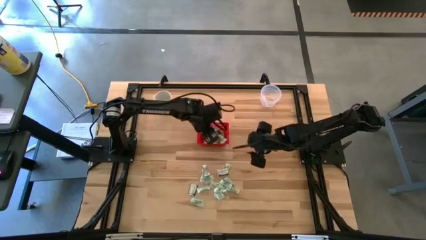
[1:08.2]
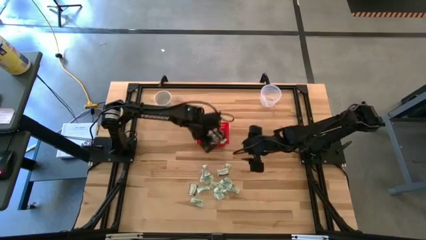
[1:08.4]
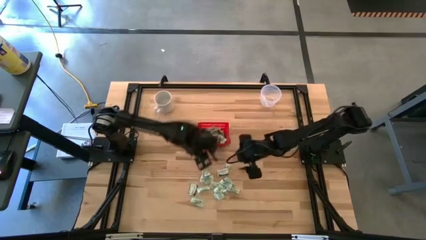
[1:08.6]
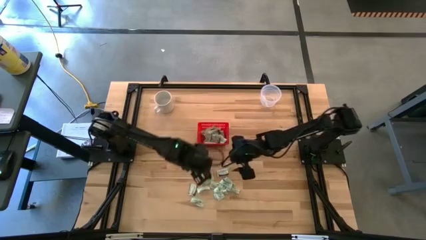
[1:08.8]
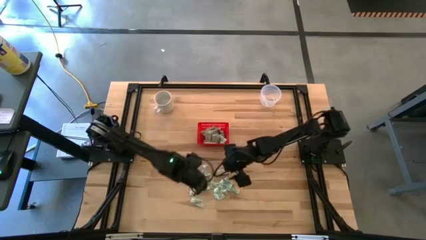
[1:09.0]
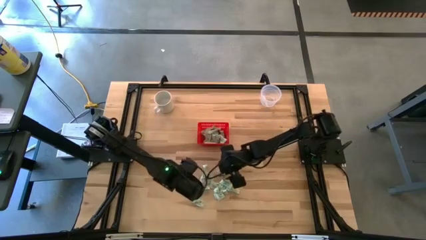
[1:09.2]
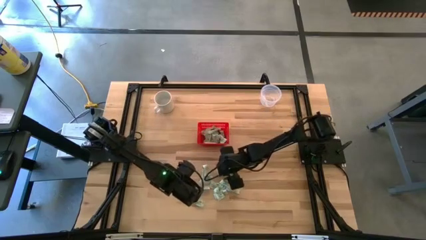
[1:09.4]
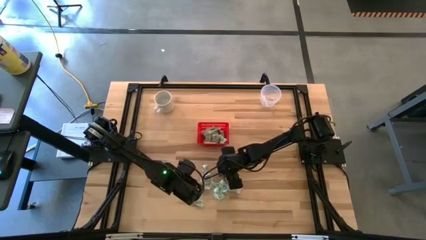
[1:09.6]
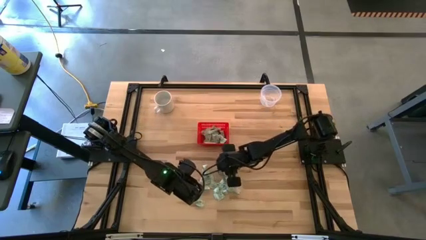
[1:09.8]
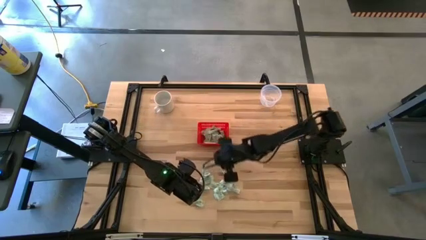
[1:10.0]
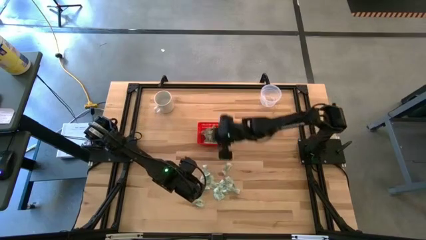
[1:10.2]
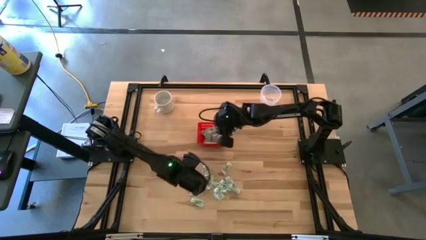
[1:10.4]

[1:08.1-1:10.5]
Task: Pick and place items into bin
Put the truvia packet into the red bin

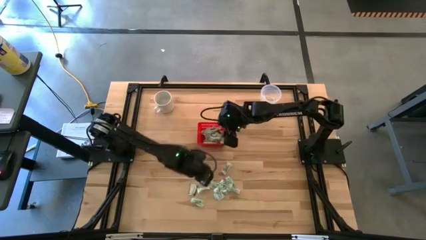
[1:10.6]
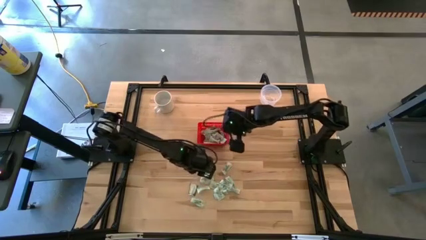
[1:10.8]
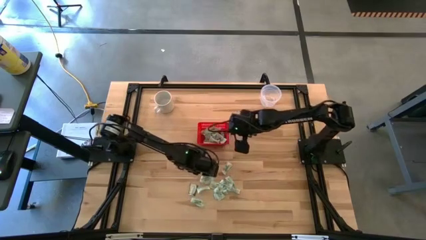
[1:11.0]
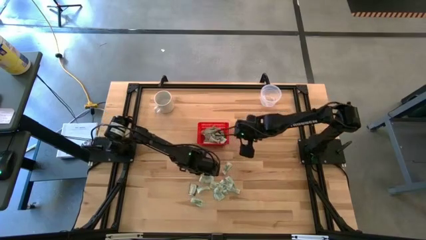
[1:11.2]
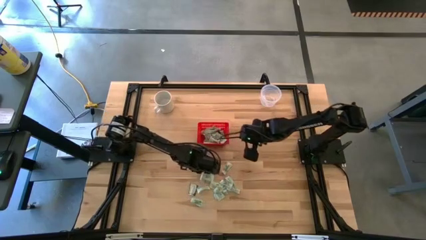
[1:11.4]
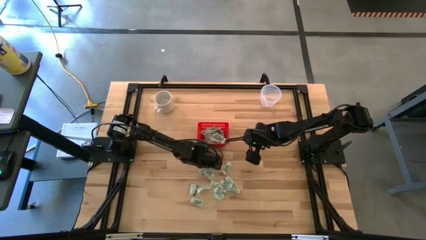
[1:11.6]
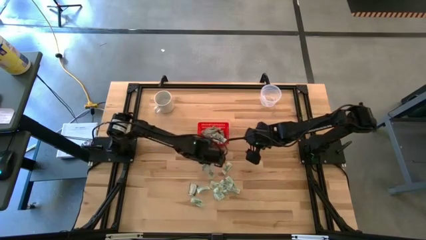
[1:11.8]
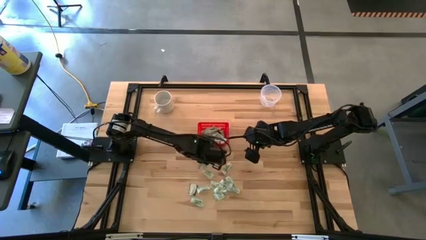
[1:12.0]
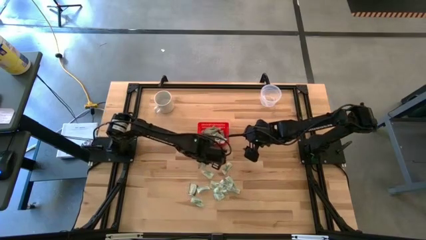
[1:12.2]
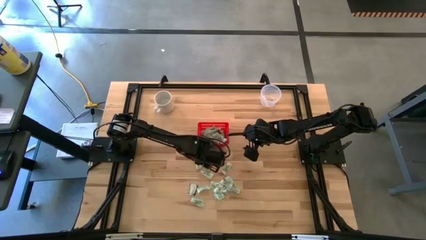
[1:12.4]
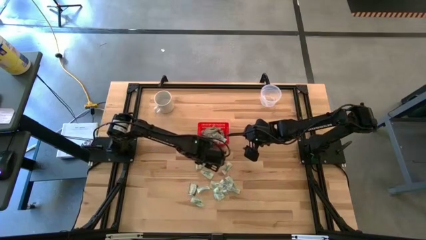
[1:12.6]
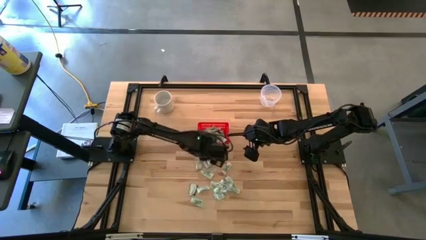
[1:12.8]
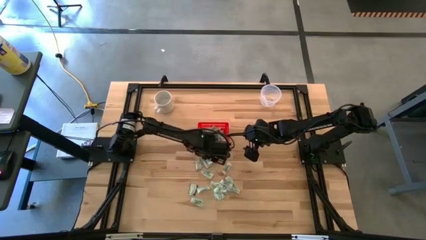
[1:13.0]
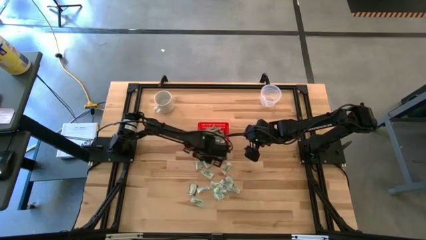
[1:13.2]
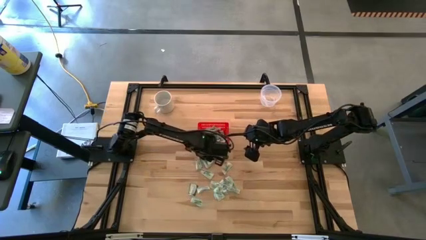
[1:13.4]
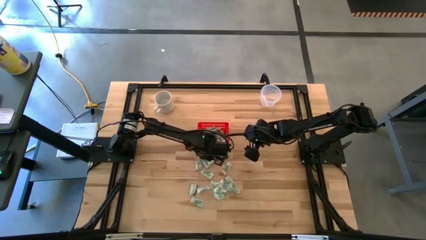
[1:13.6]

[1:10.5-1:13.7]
Put the stevia packet into the red bin

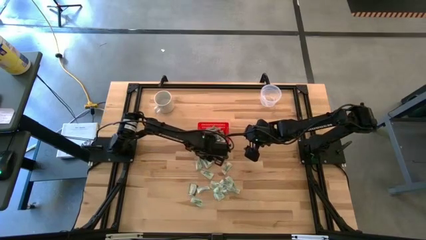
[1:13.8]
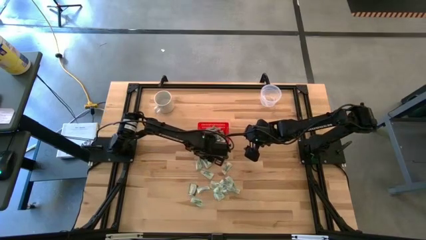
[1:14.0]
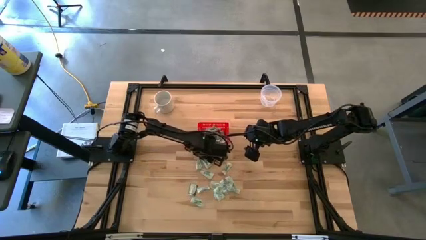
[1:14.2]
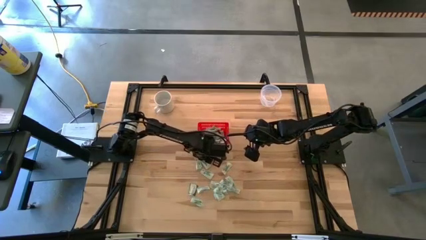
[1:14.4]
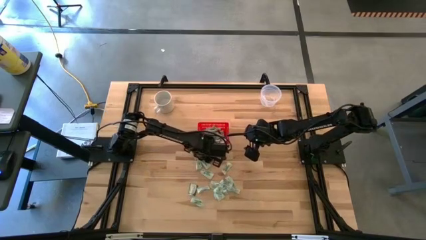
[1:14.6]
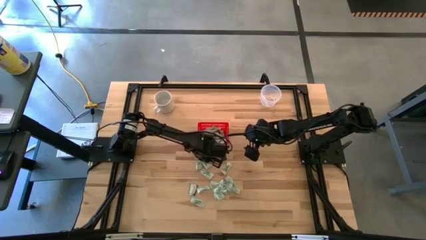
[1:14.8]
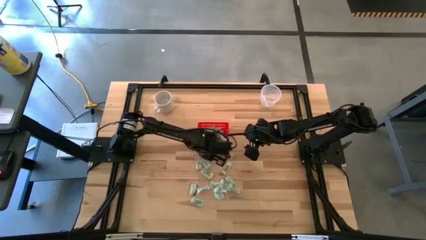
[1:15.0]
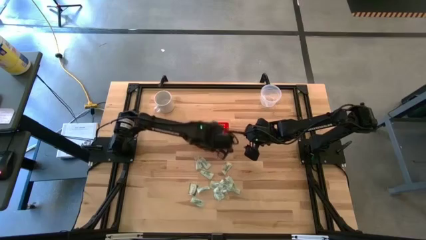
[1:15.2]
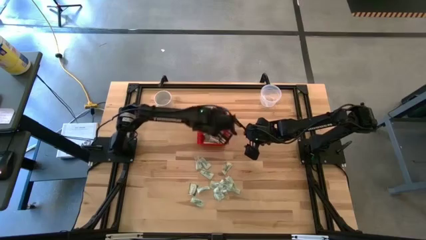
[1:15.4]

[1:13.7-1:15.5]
Put the stevia packet into the red bin

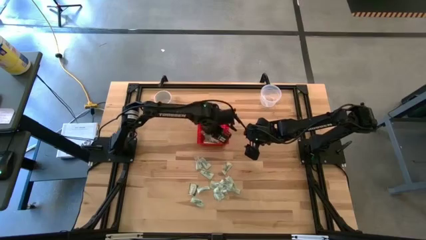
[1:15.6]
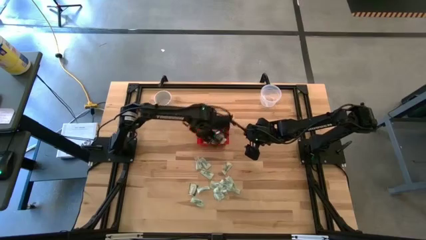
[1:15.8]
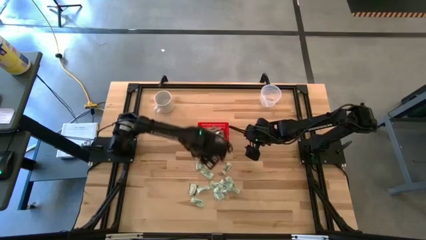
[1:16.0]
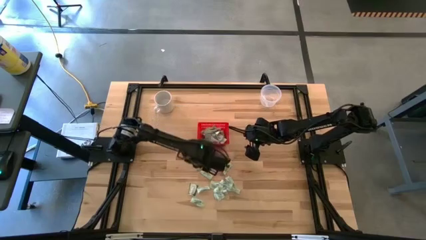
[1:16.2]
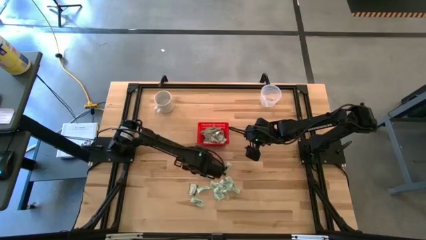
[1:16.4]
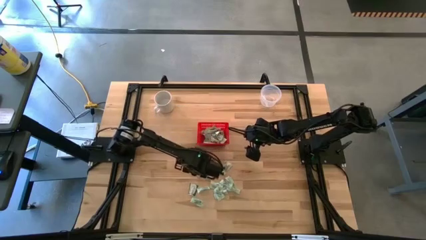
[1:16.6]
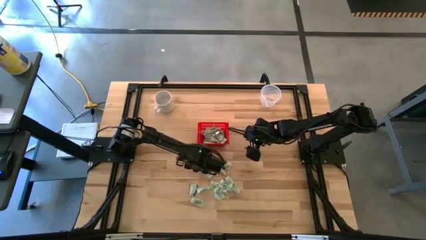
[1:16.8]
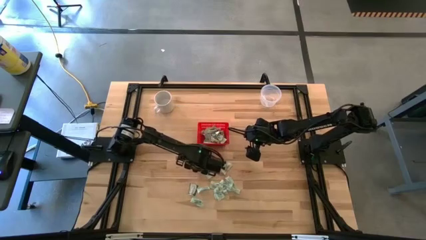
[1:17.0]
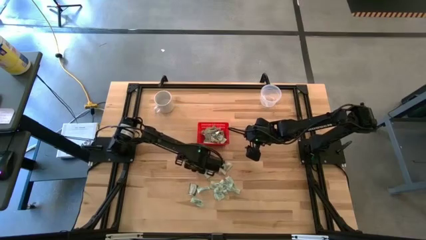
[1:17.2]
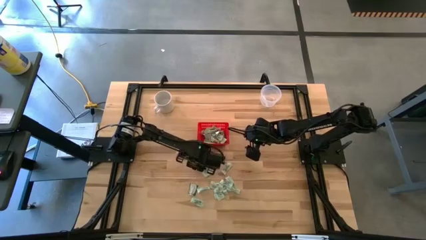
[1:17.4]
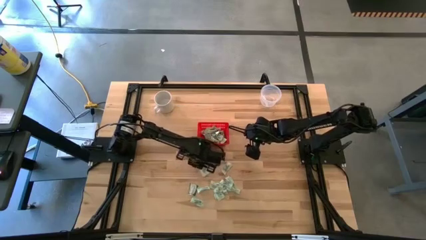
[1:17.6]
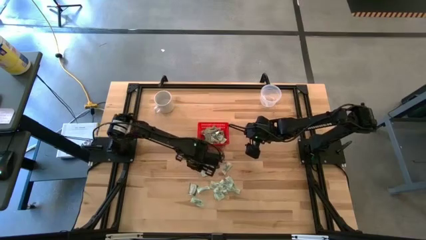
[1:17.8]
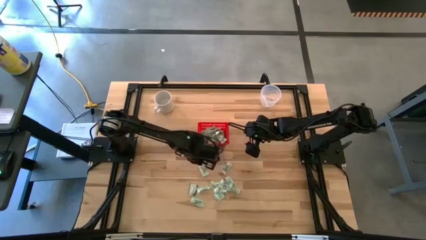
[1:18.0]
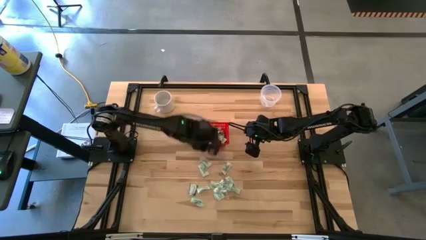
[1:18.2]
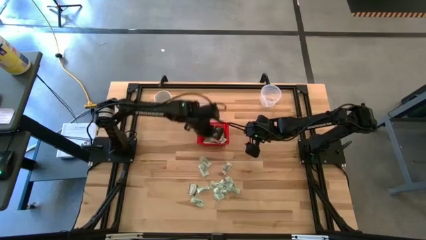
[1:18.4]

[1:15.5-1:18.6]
Put the stevia packet into the red bin

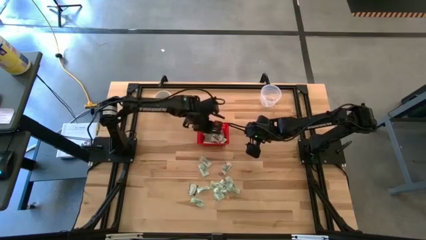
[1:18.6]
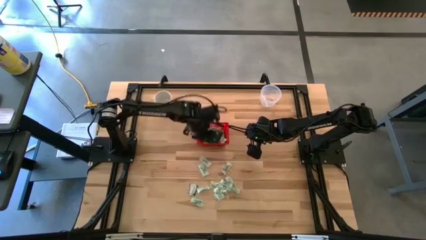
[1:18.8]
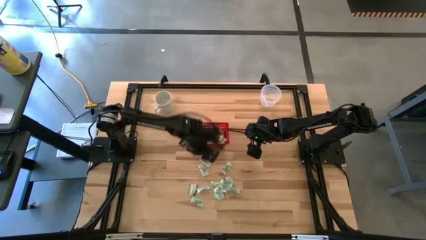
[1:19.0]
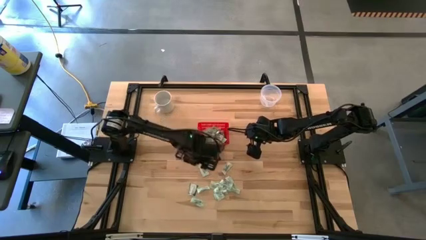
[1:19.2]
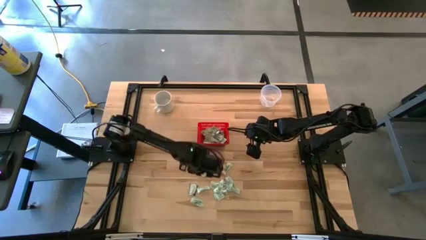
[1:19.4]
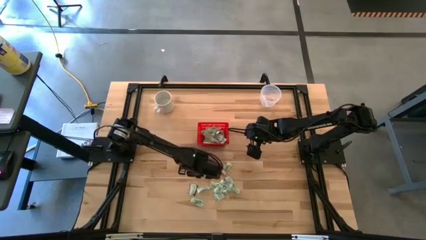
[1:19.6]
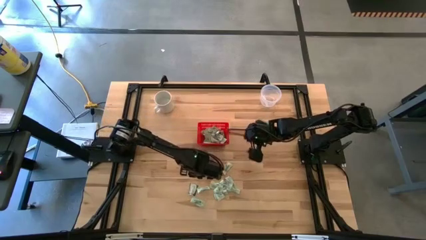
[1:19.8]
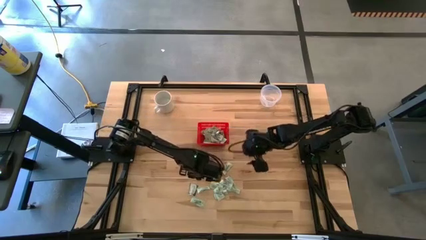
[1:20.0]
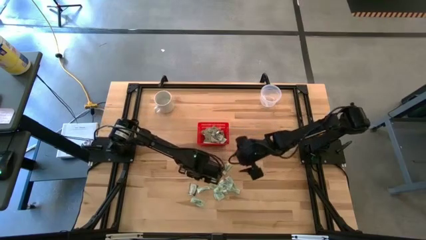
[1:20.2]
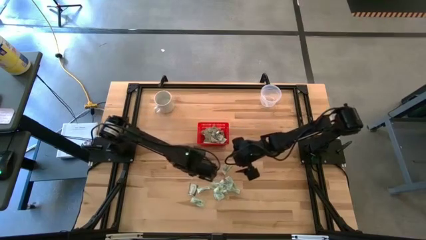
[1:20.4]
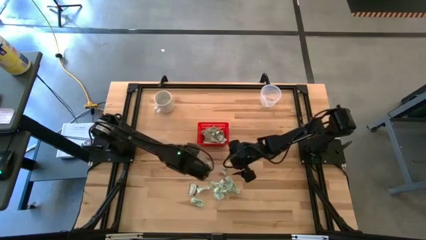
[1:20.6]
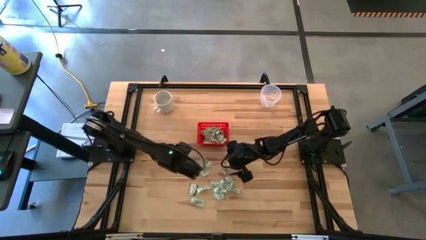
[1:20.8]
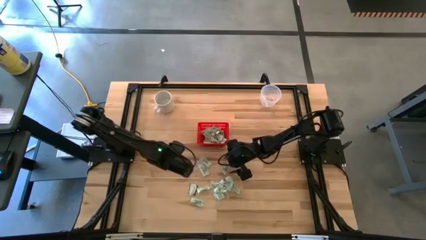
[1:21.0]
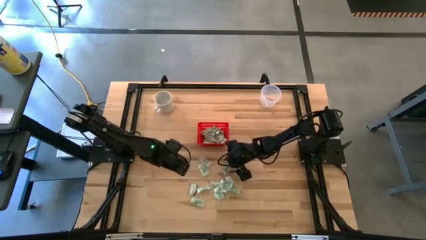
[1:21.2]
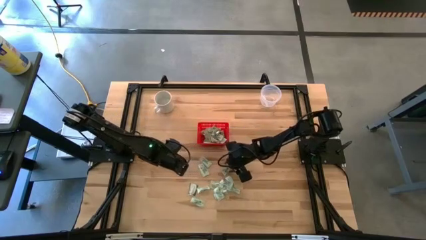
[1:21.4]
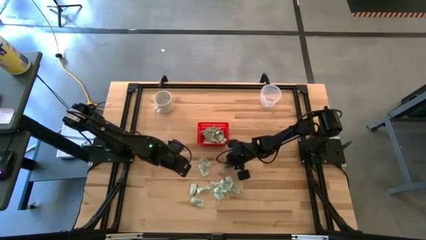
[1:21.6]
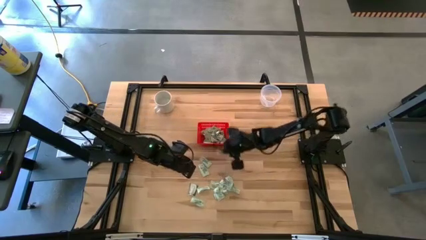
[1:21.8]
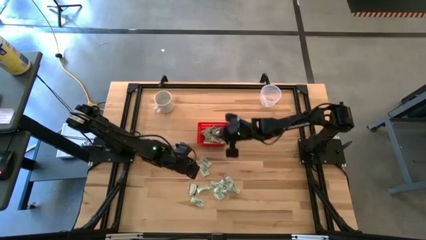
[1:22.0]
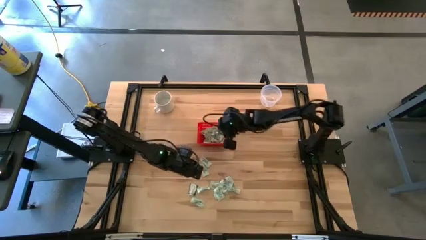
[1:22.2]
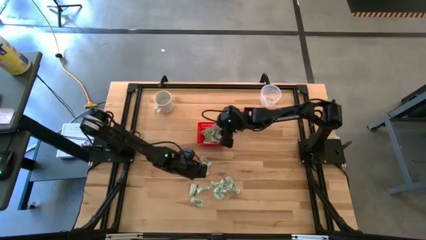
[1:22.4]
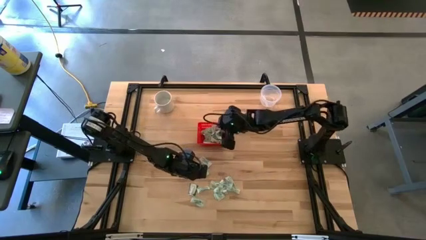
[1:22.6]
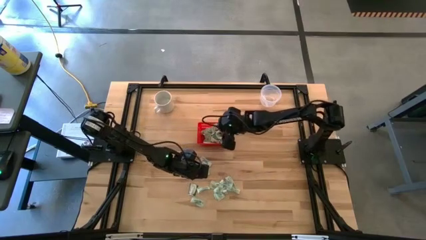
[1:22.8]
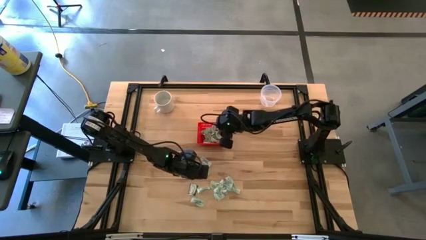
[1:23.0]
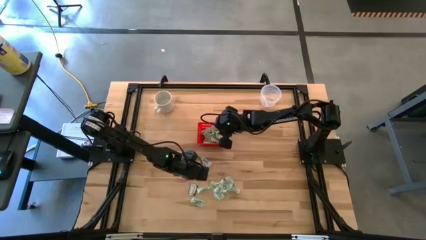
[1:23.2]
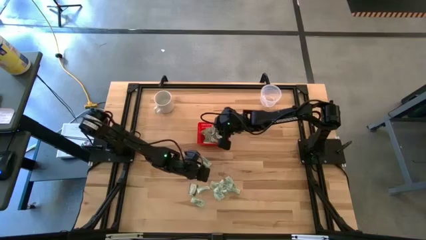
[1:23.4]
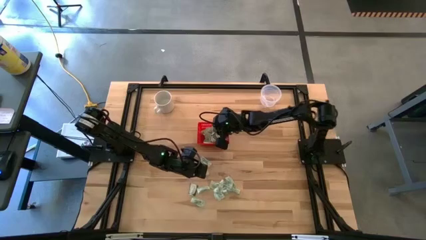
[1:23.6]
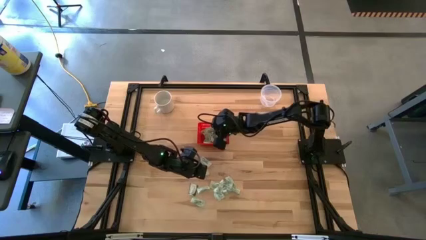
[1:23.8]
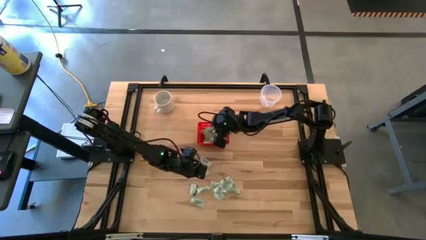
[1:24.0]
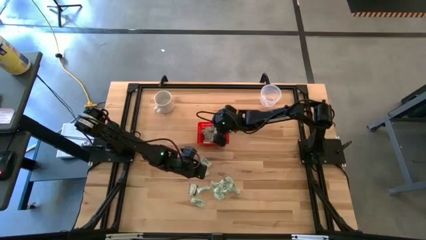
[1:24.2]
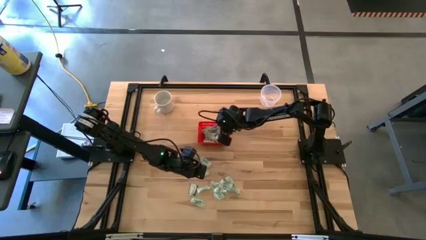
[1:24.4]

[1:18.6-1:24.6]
Put the stevia packet into the red bin

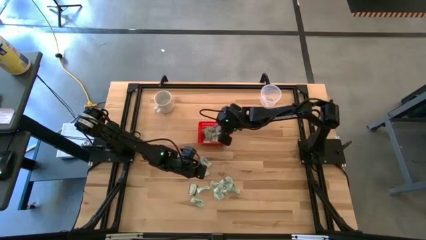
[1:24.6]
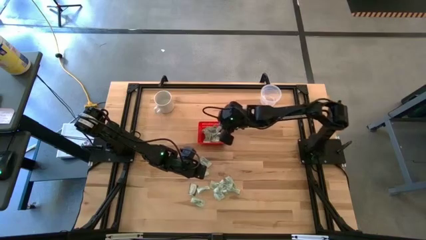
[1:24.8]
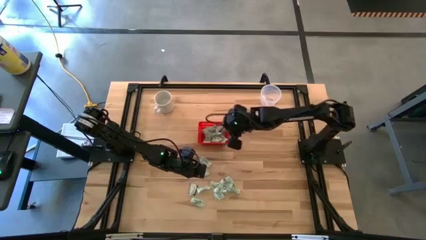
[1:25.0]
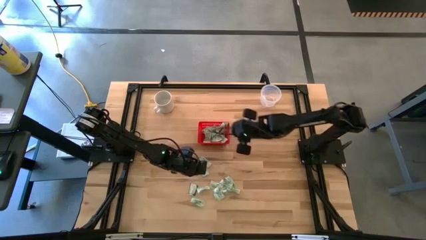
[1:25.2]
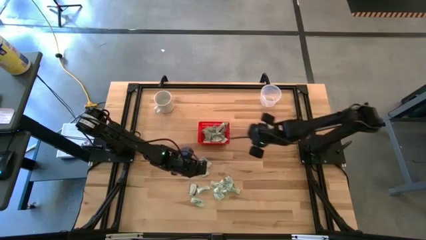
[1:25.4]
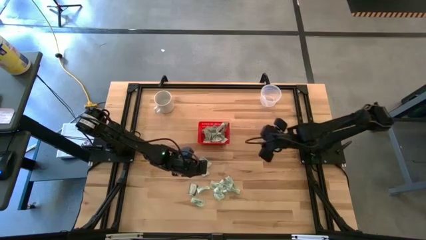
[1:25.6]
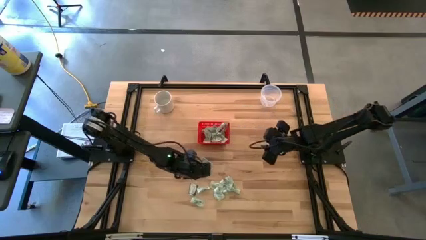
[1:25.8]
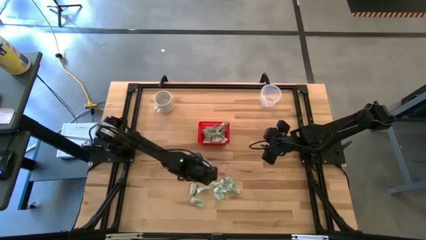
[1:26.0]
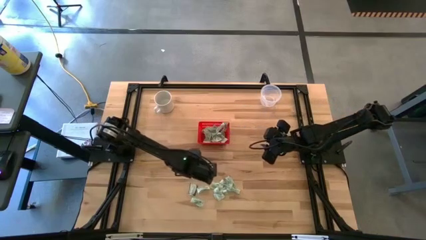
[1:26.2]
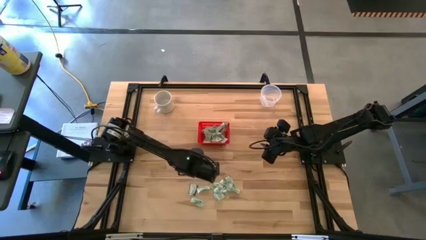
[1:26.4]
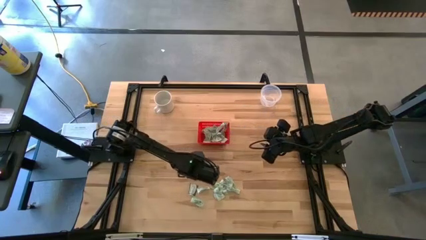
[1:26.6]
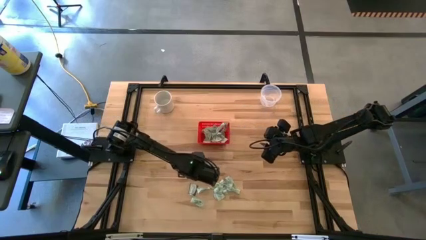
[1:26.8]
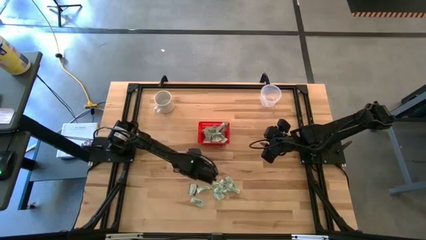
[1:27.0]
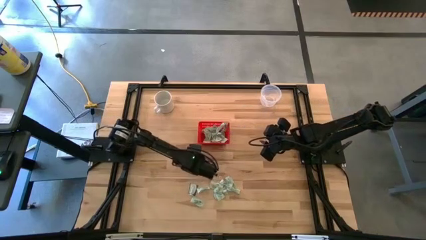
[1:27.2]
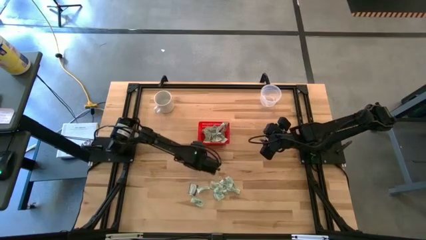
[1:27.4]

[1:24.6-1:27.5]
Put the stevia packet into the red bin
